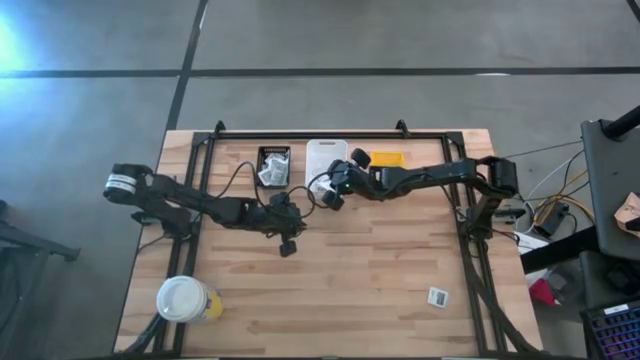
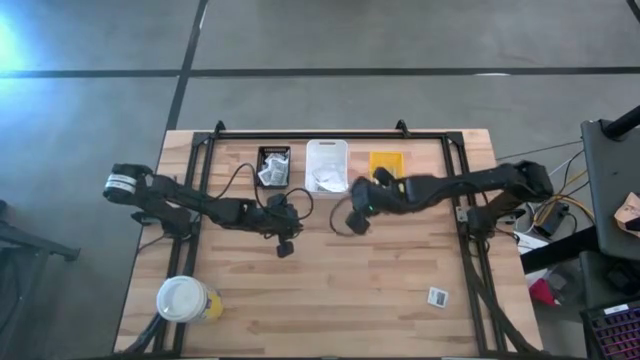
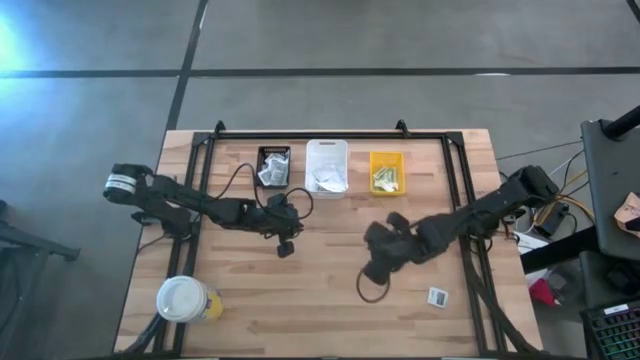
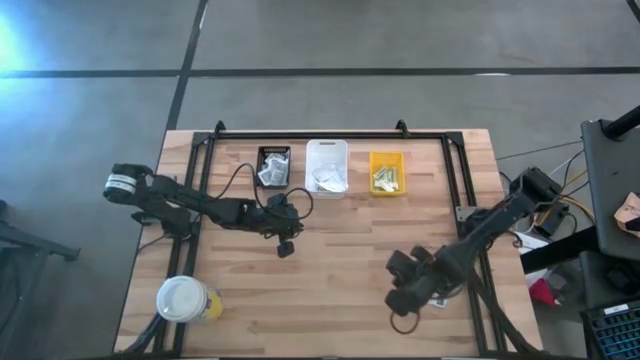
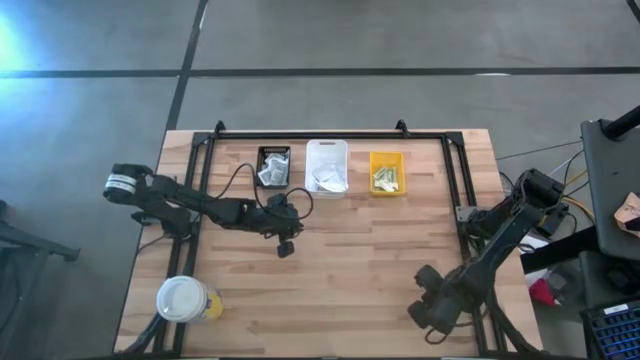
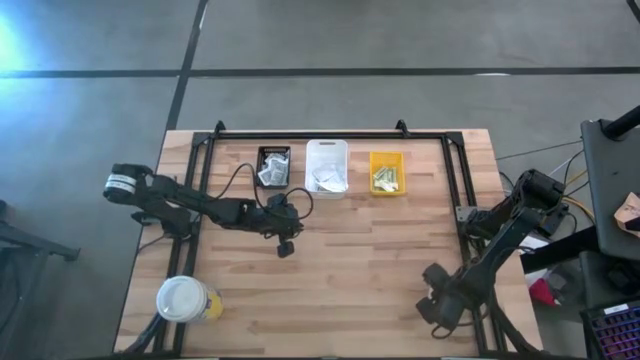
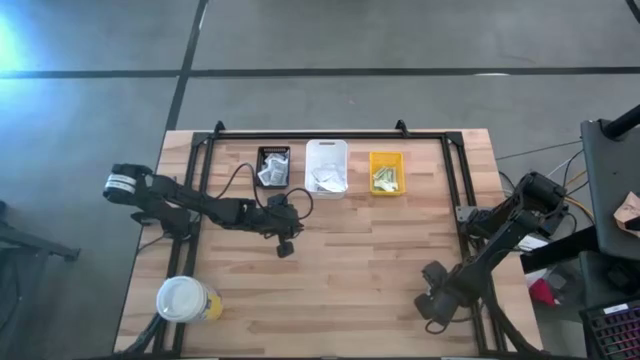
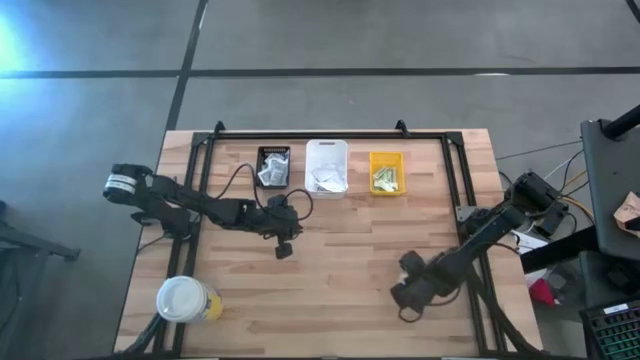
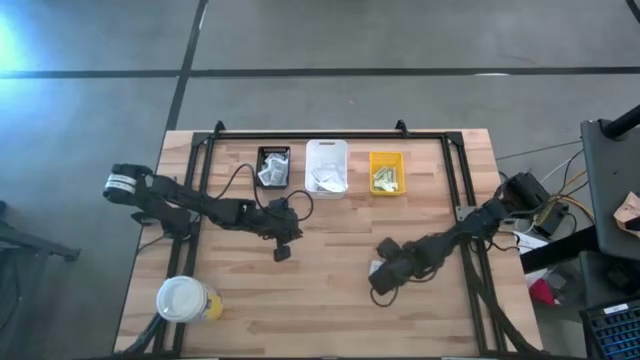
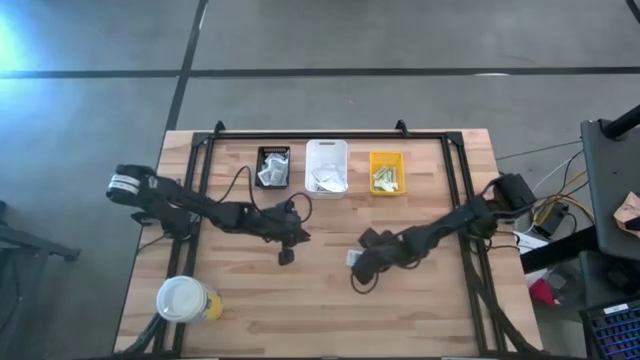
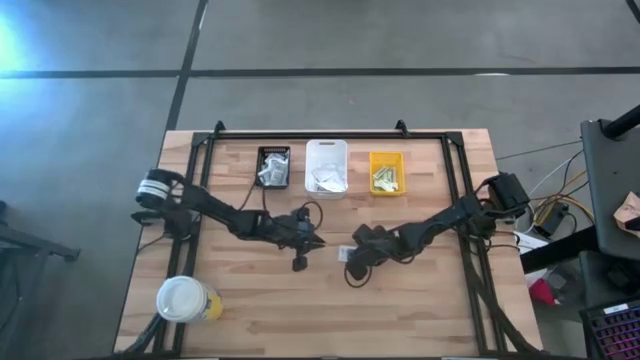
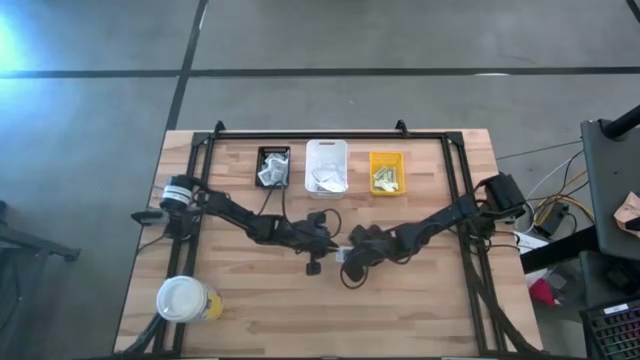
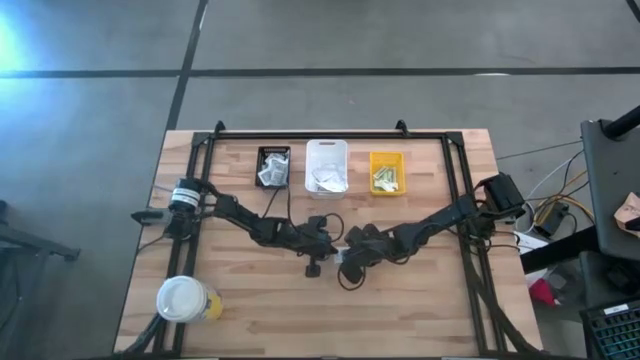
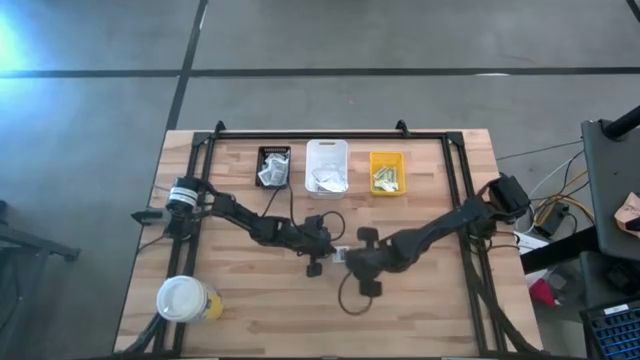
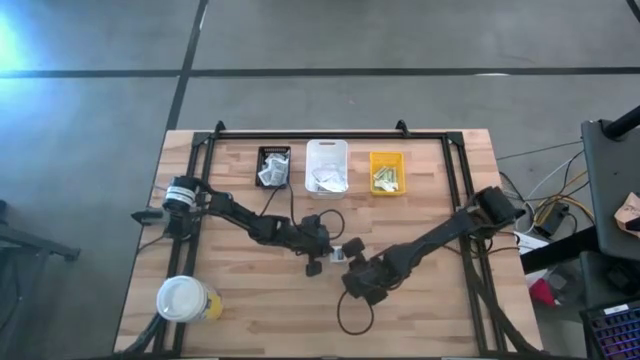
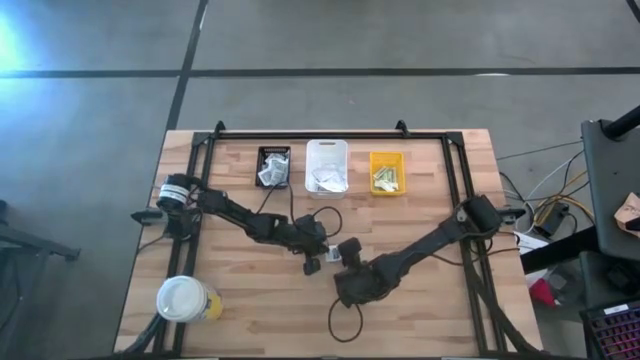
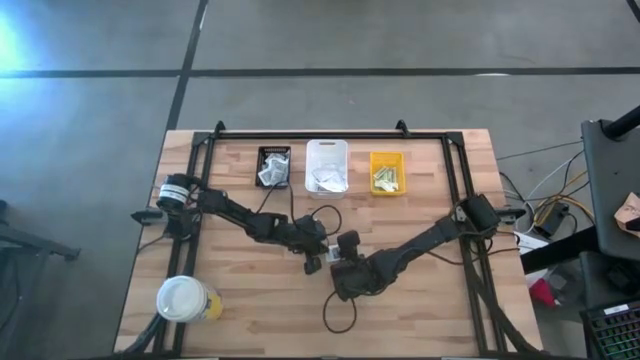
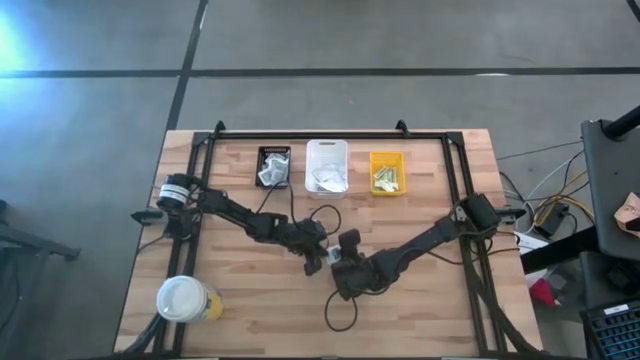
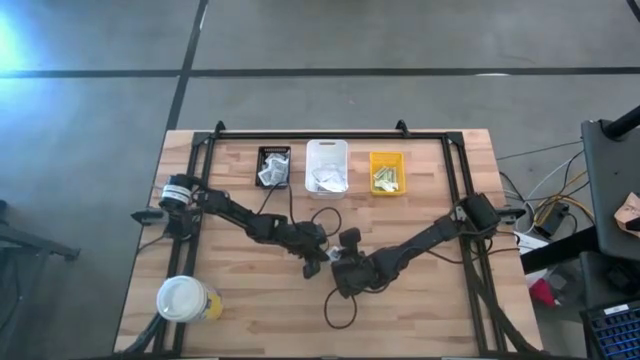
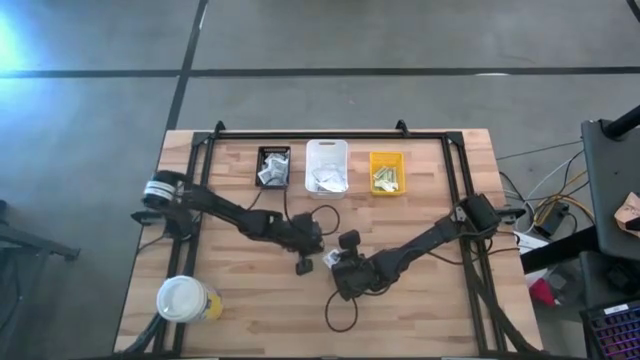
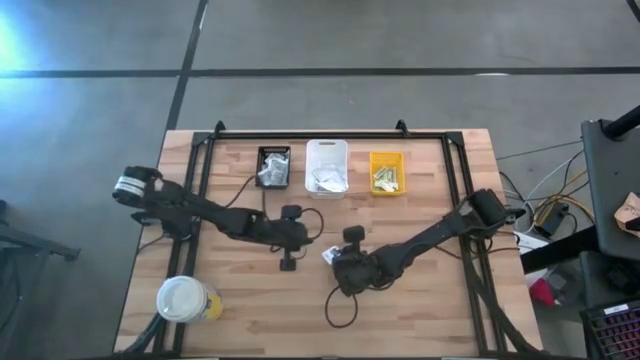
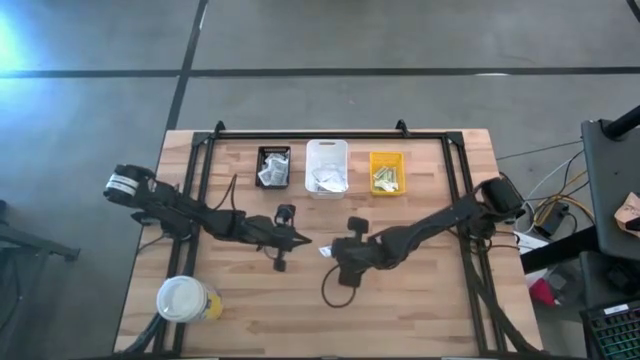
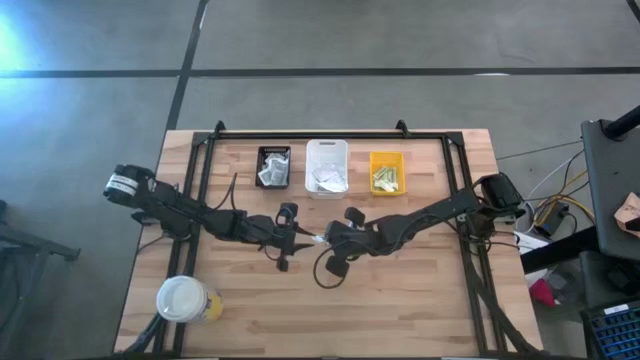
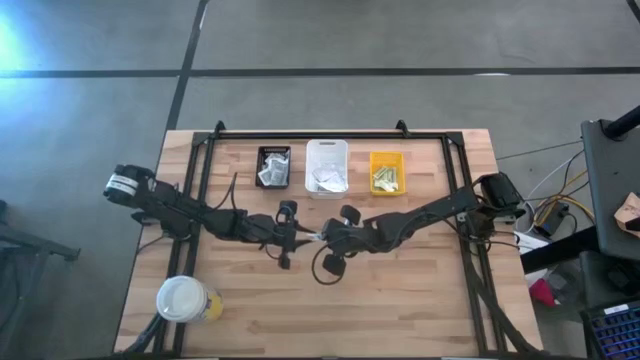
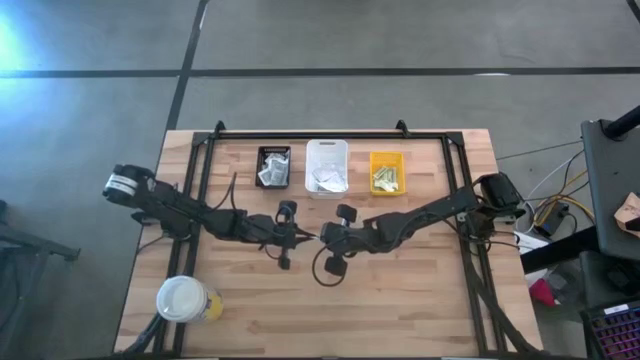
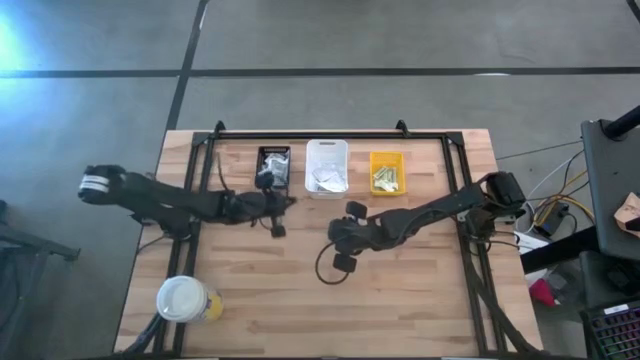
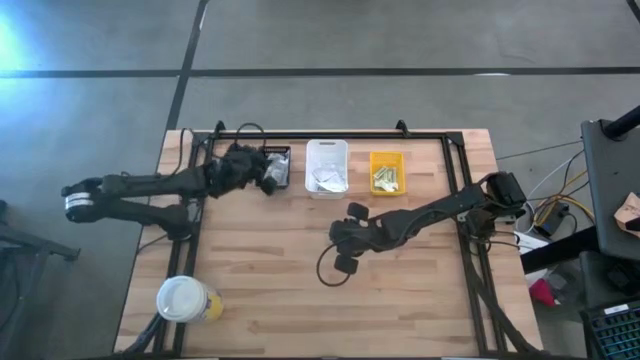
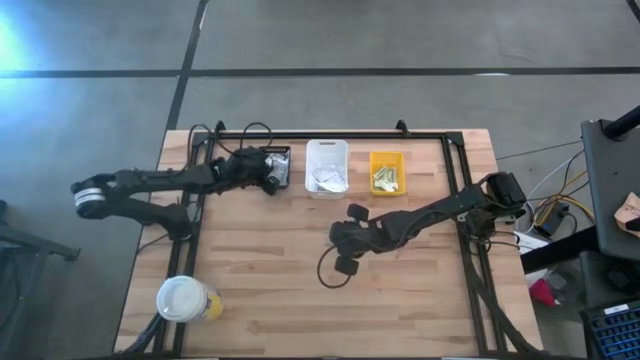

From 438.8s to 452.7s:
Task: Pick & Place First Aid Supplies
Put the towelette pack into the black basket

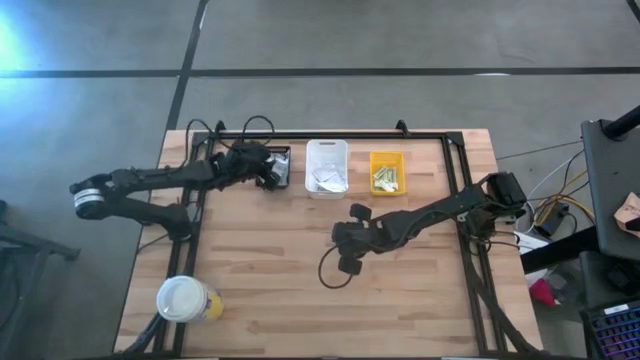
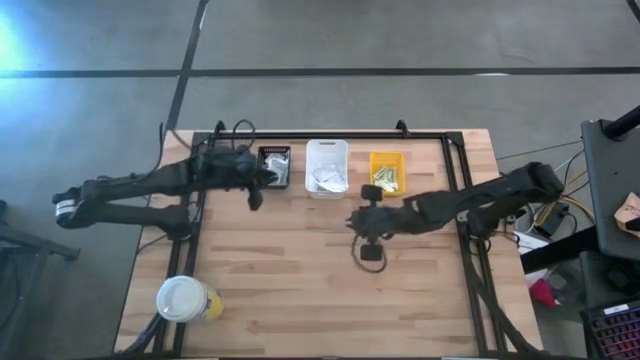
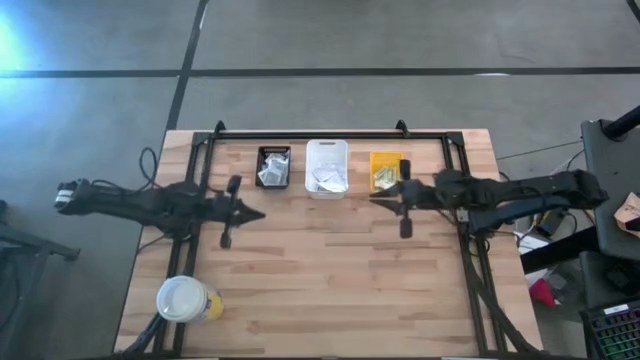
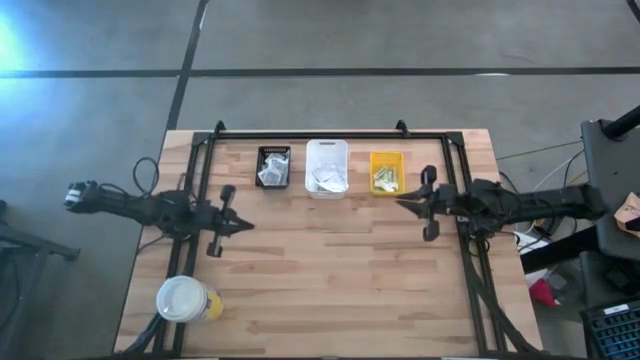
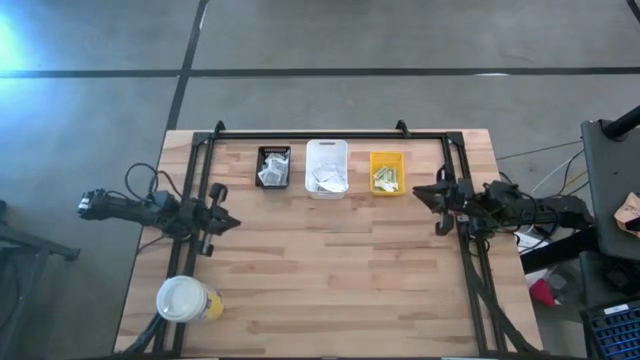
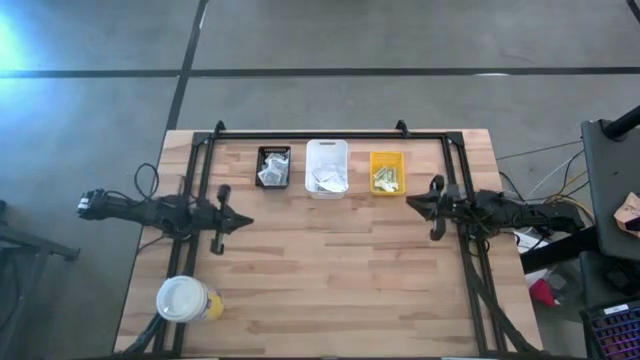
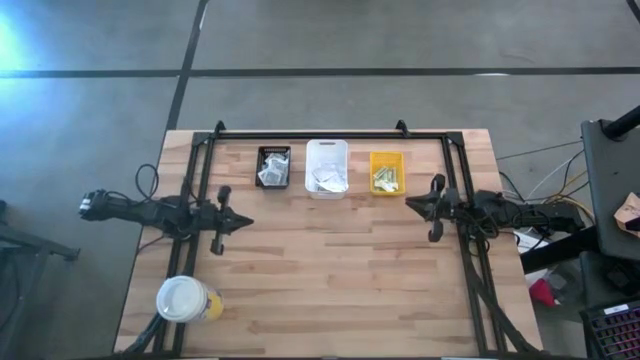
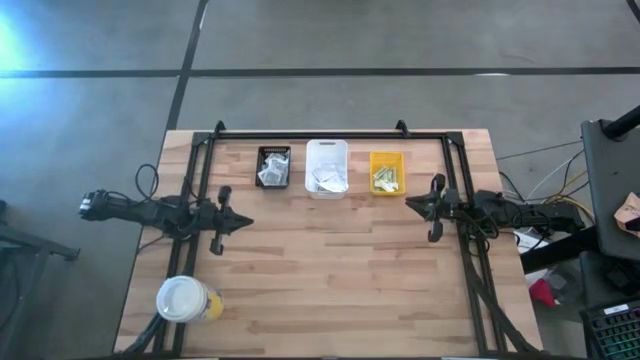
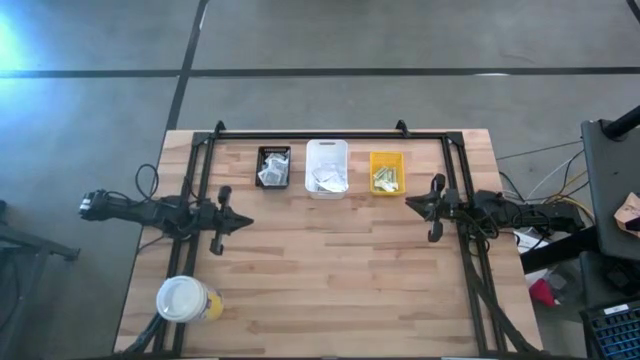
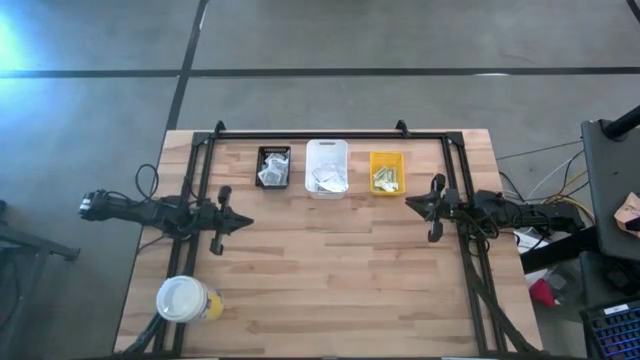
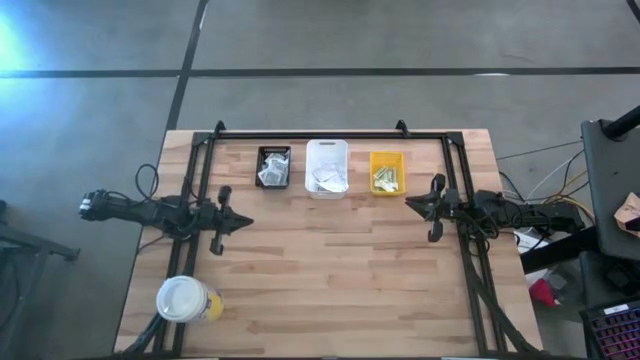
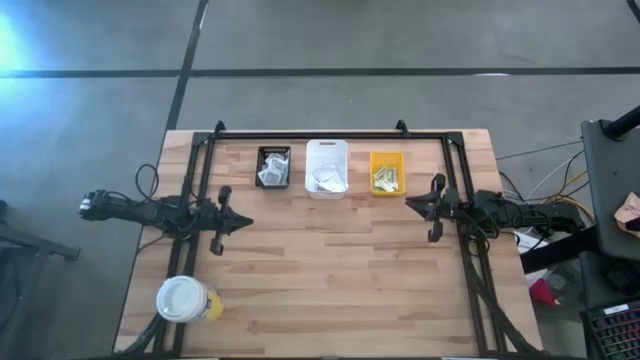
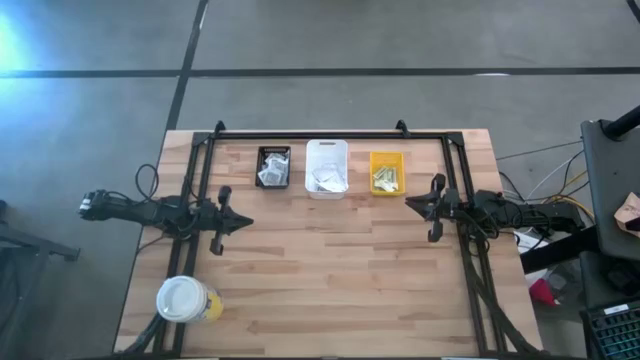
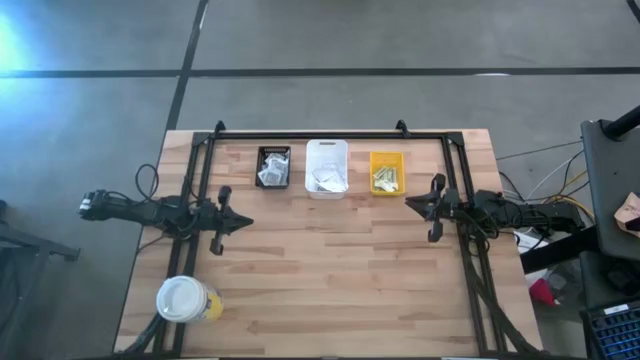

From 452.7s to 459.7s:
Return to Home Position
